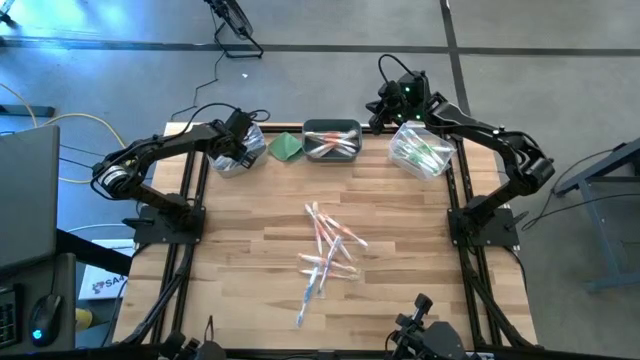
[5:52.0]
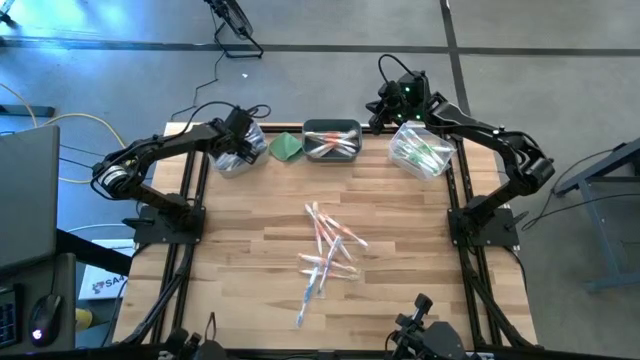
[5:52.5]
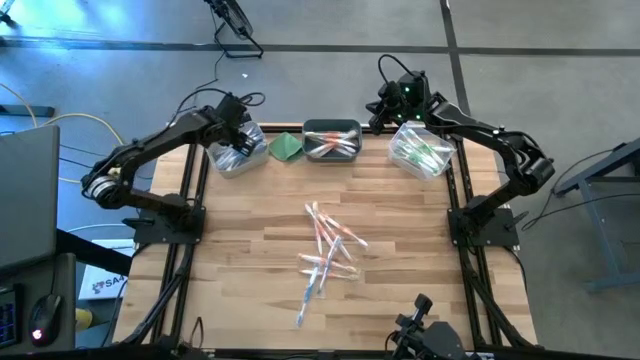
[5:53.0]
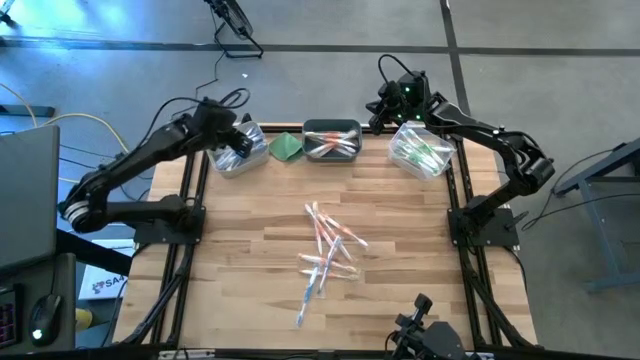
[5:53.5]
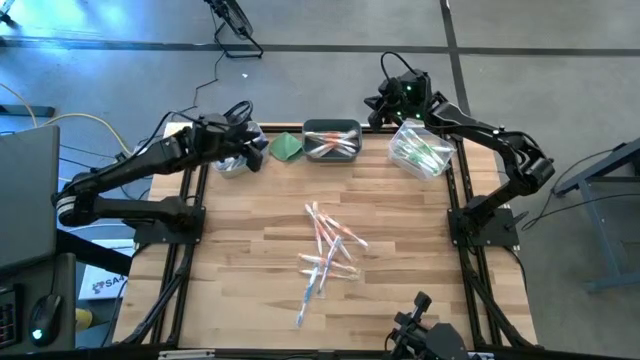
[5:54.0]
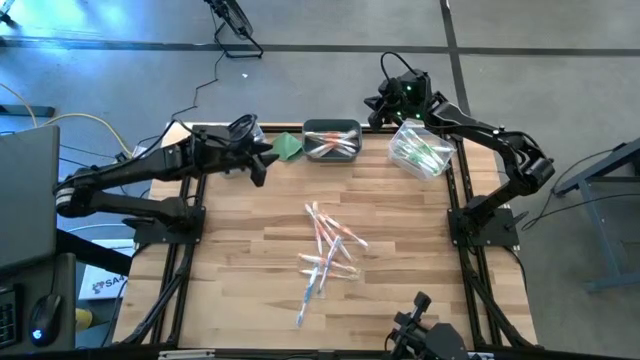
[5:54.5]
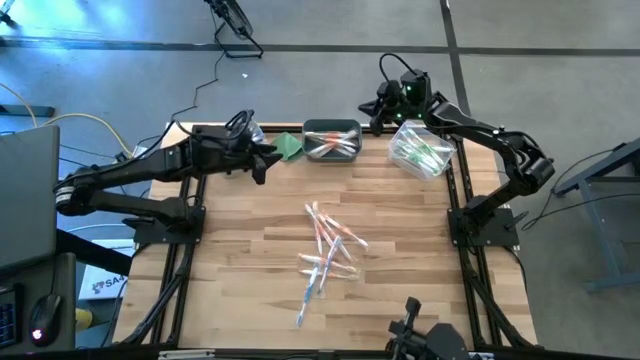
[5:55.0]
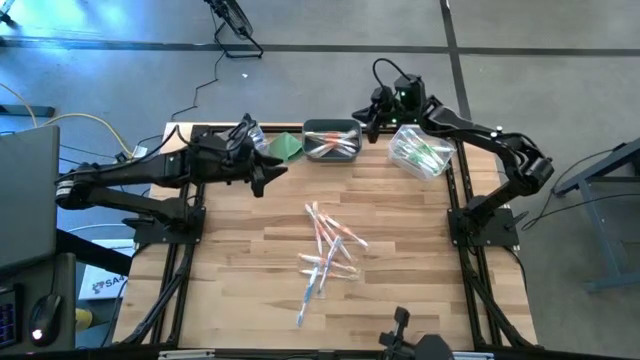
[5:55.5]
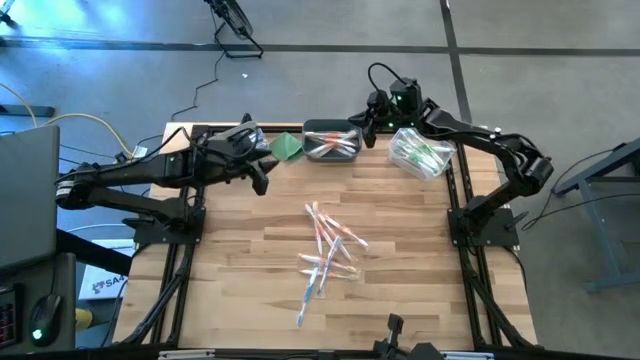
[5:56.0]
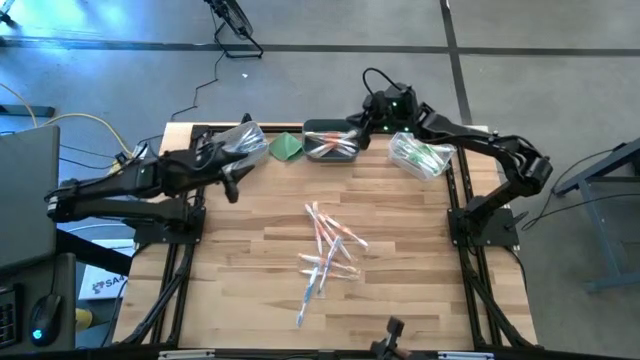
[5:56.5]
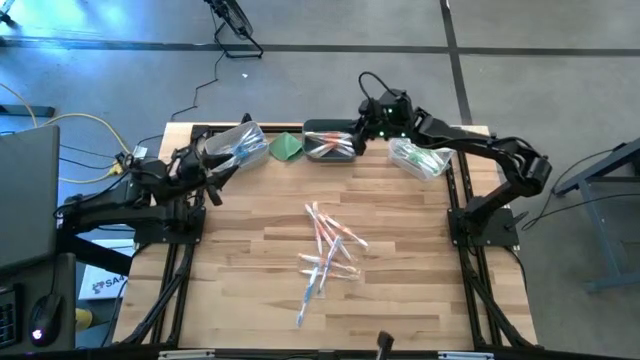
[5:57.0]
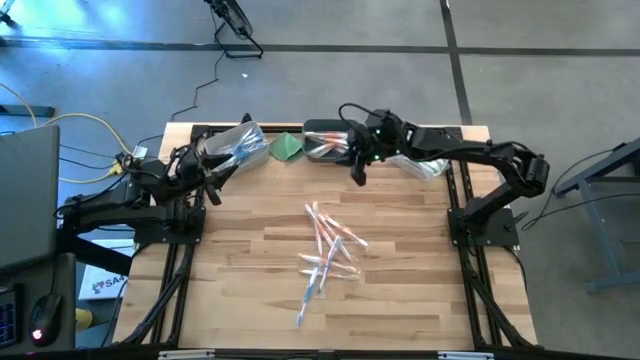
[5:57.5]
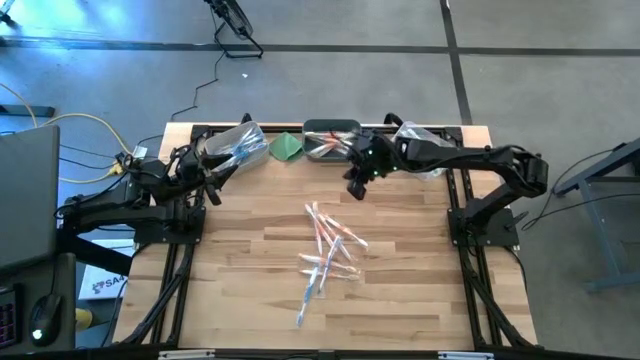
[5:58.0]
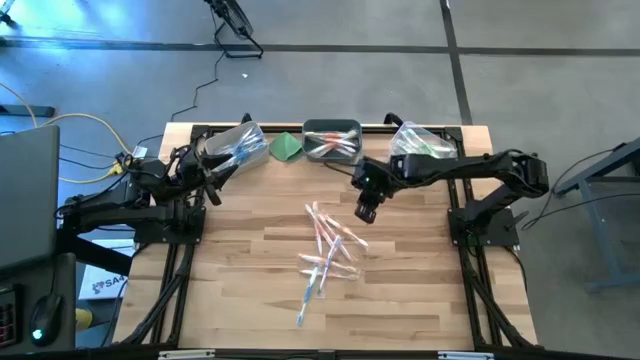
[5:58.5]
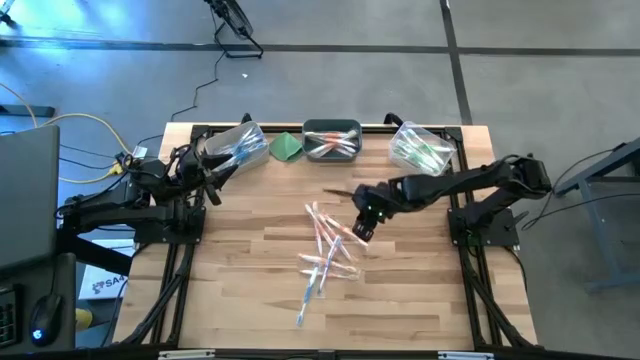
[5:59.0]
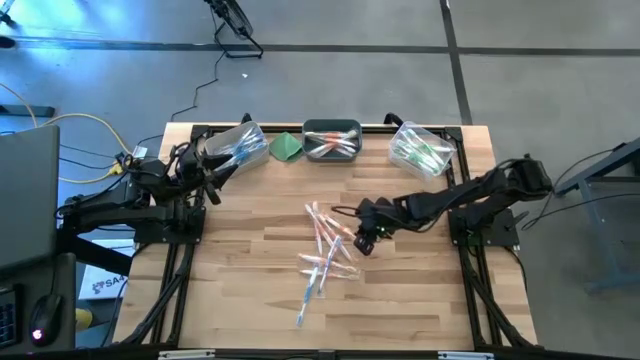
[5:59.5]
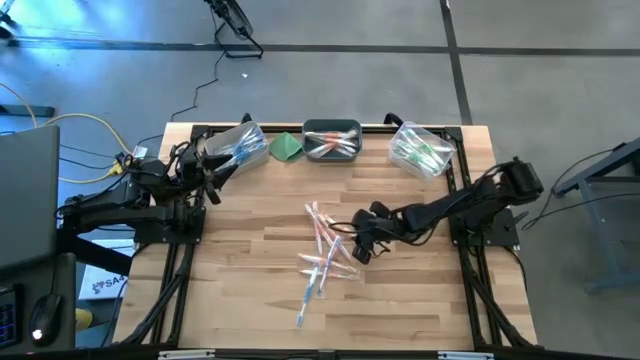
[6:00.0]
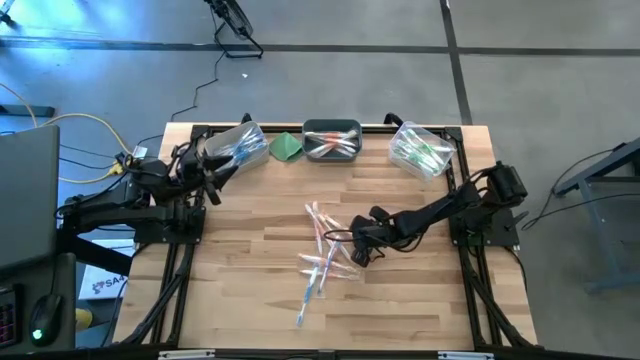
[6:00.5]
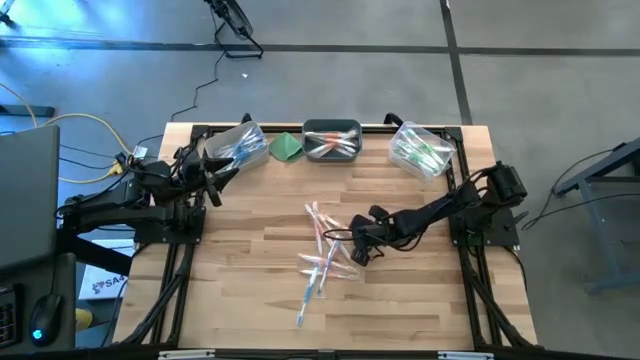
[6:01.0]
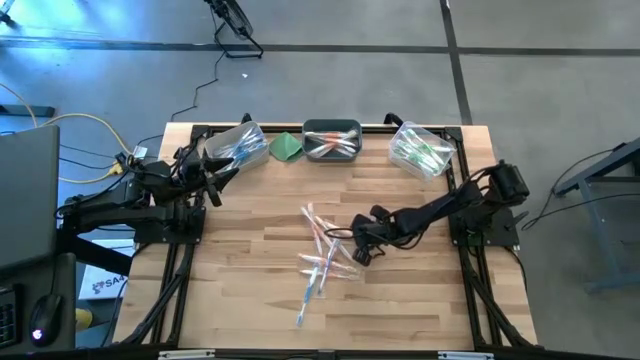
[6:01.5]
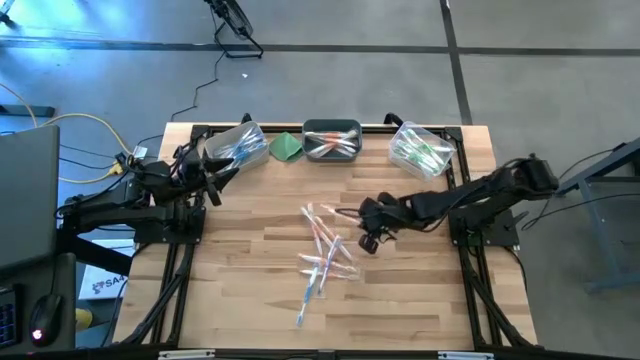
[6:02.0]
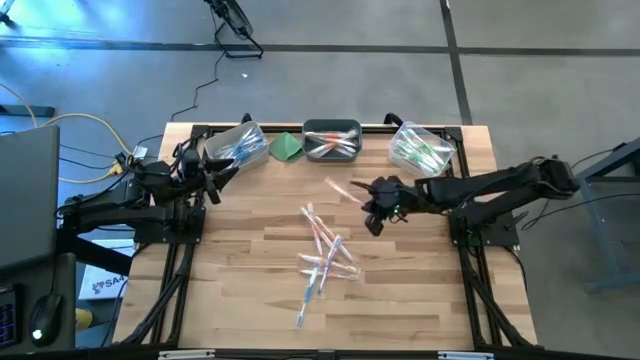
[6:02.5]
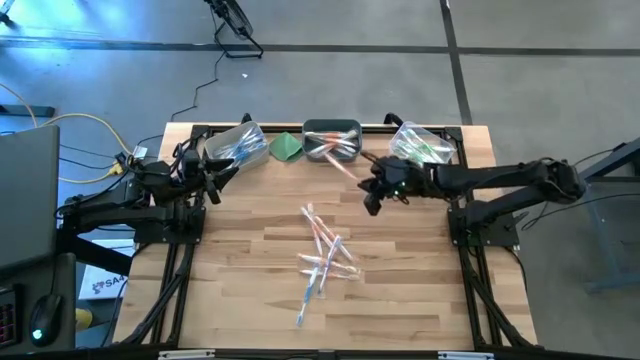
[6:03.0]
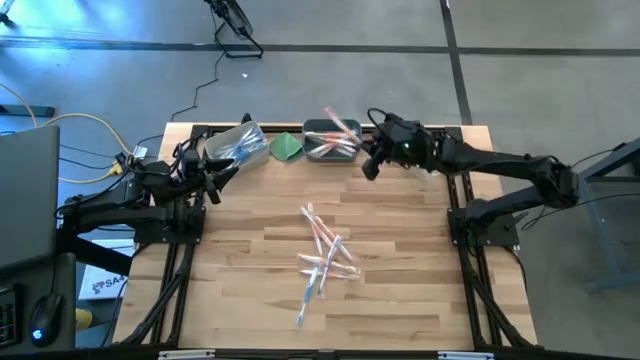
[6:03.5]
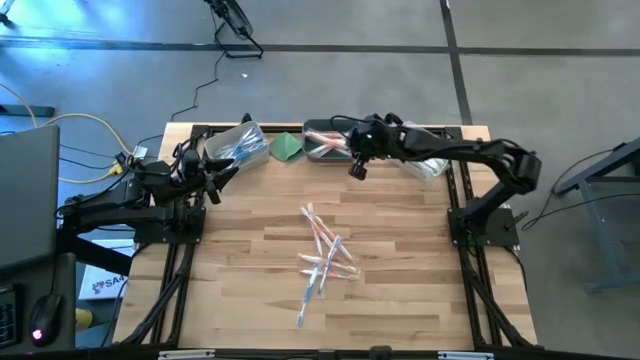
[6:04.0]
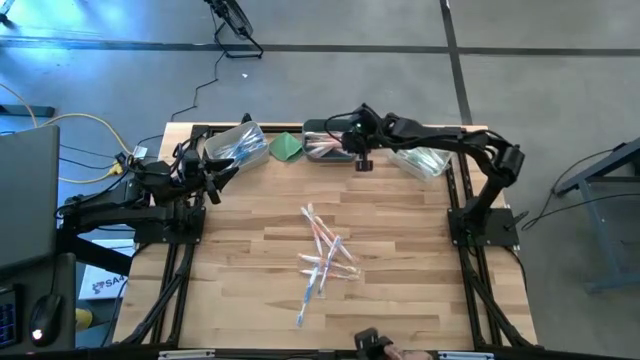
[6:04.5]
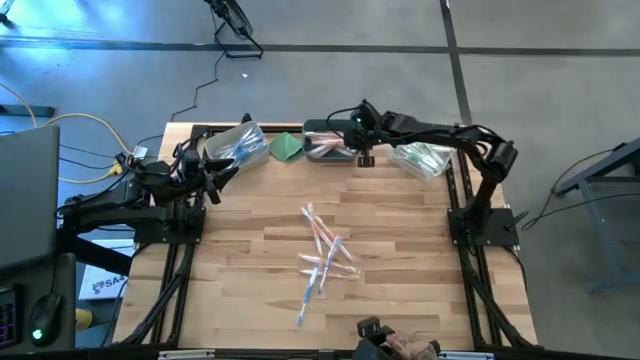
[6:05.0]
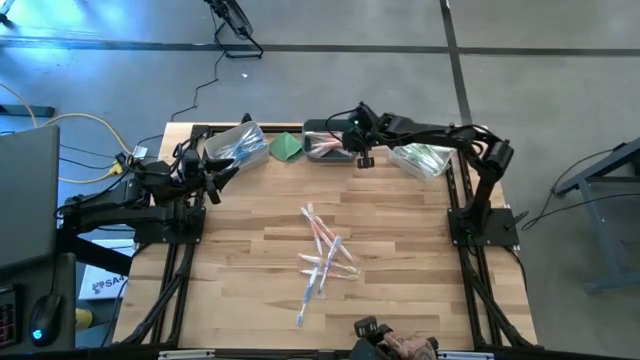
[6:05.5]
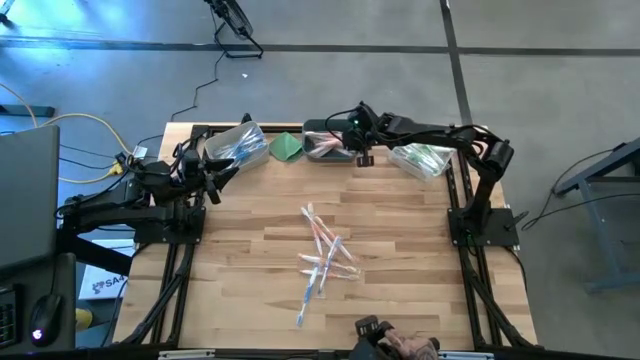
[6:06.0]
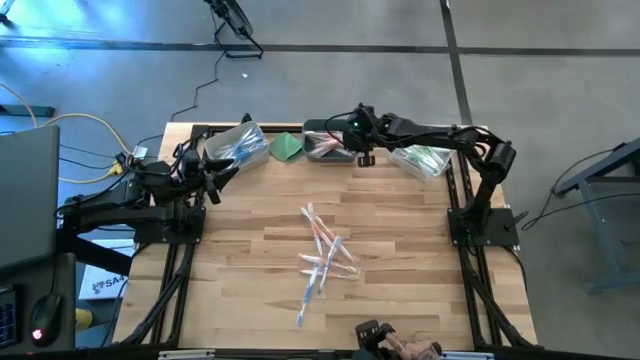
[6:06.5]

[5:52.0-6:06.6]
Task: Pick & Place Toothbrushes
Put the orange toothbrush into the blue bin

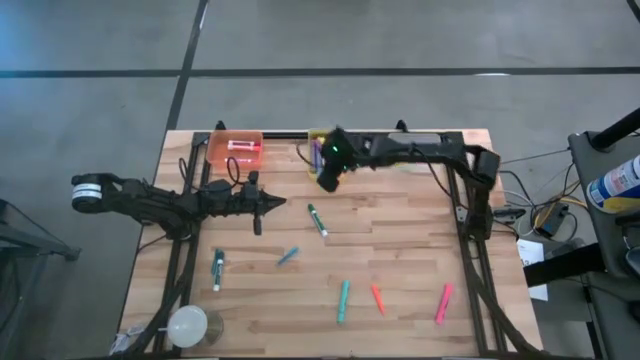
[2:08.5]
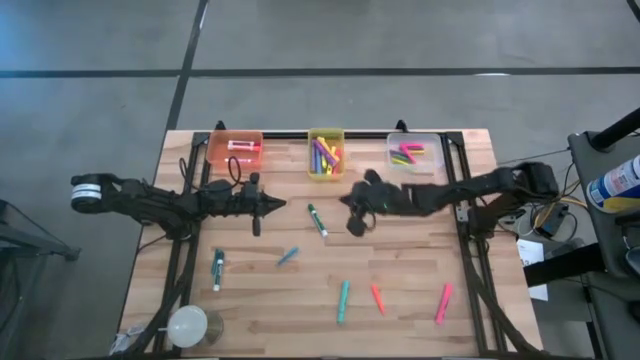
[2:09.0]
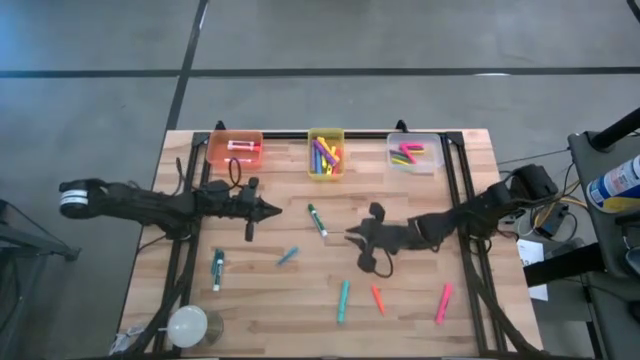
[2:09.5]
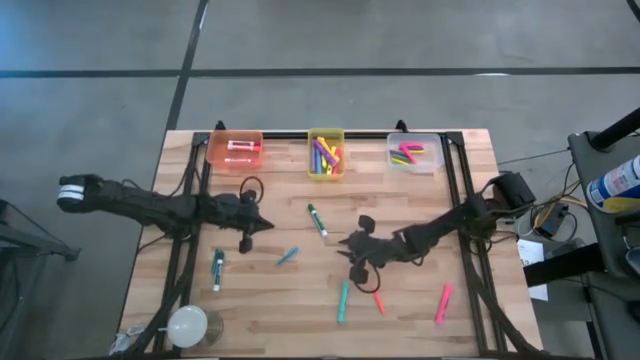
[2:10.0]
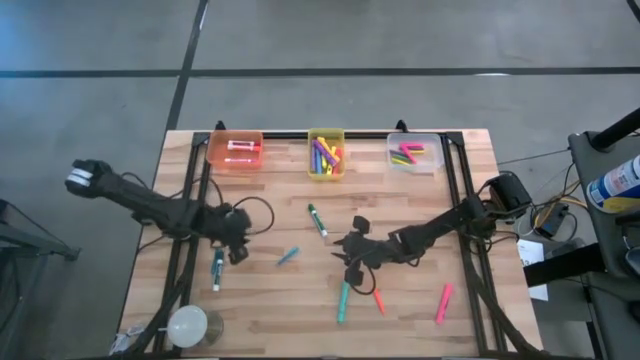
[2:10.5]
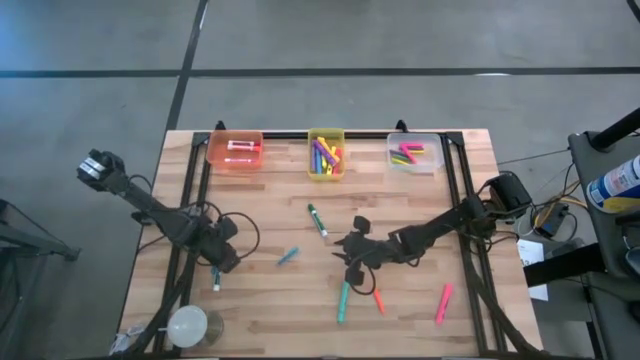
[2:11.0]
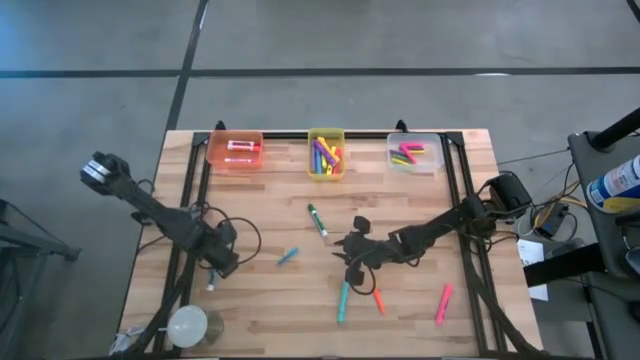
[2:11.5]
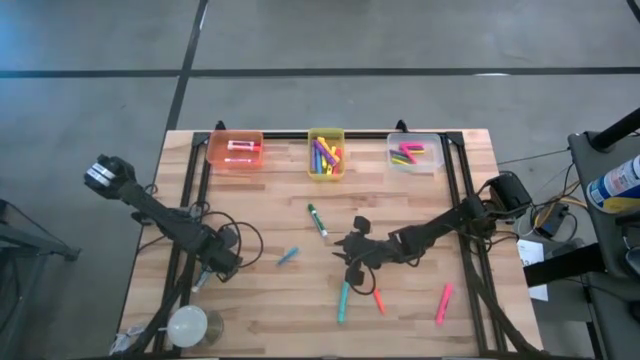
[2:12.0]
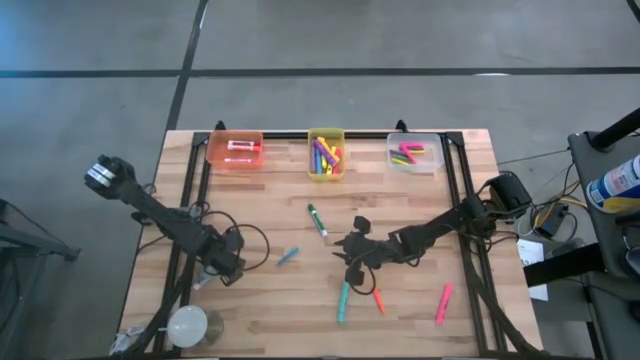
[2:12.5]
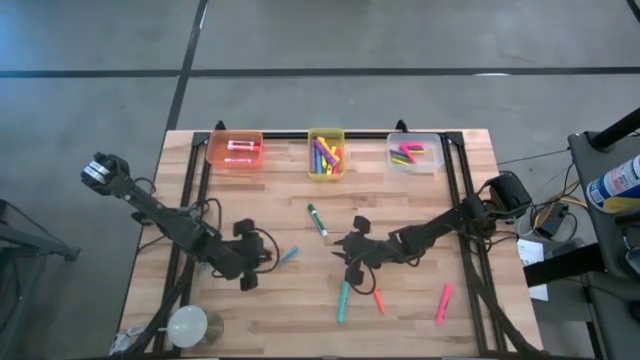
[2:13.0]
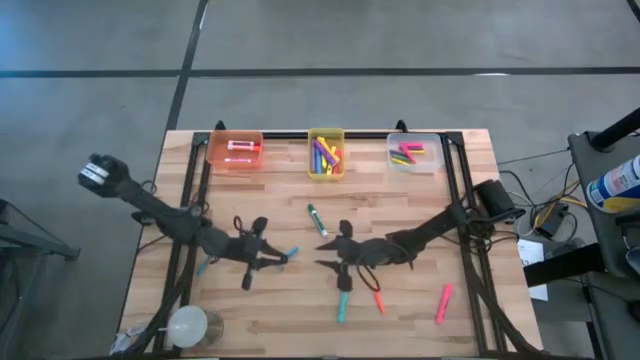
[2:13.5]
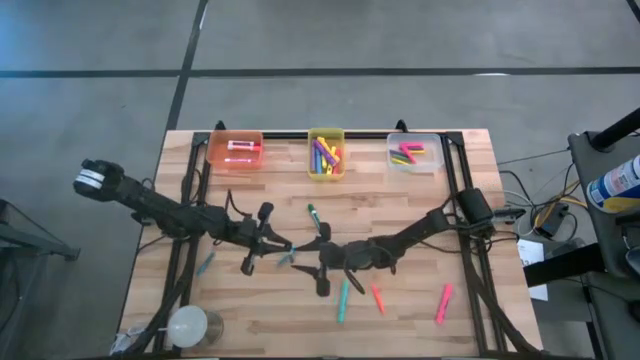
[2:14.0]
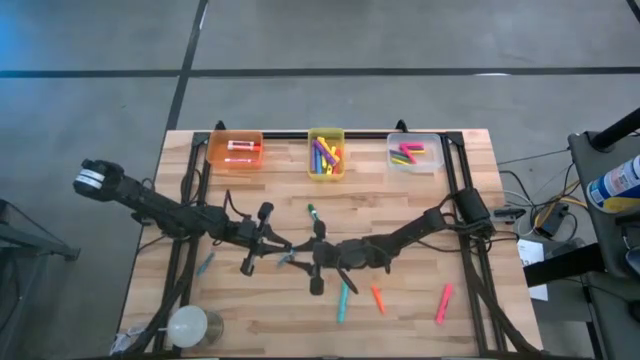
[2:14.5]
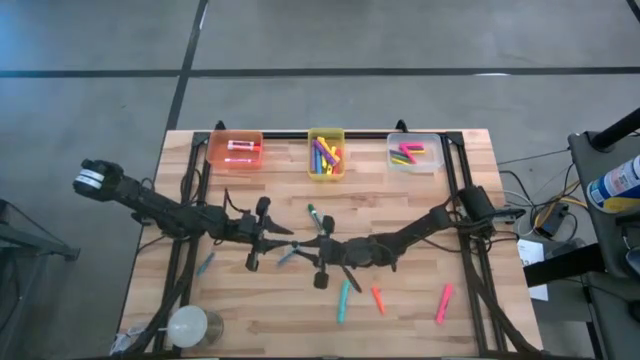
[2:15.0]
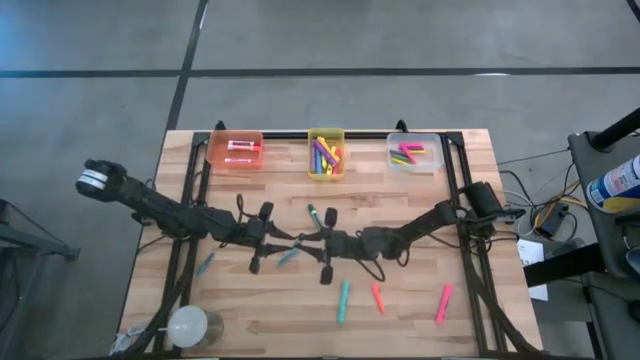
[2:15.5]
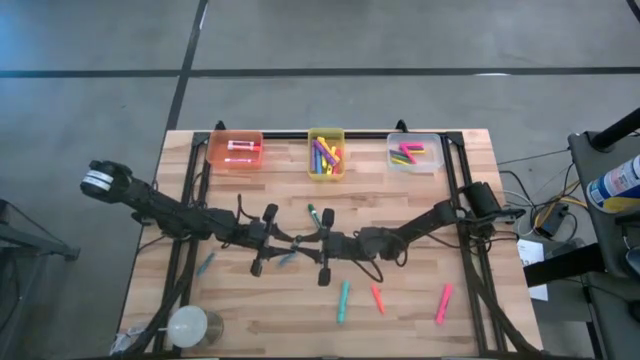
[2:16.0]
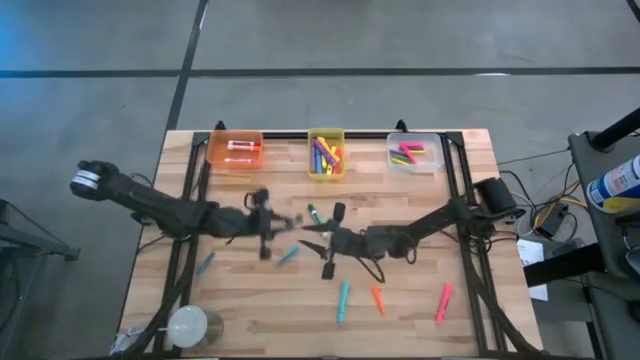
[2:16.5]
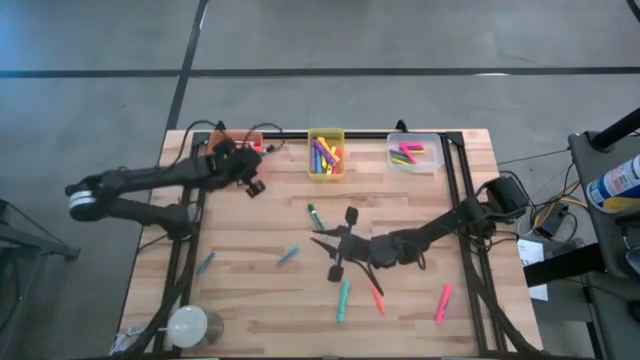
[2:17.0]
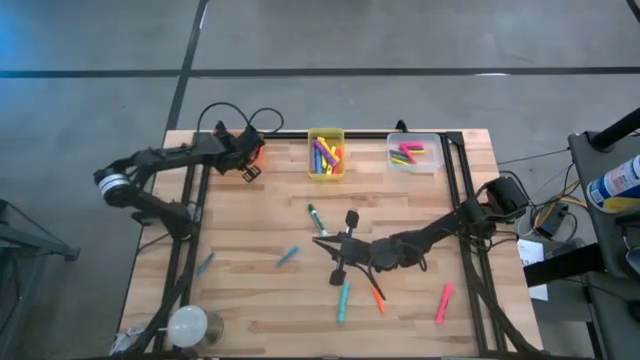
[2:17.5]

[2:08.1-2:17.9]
Task: Pick & Place Markers
Put the left green marker pen into the orange bin
